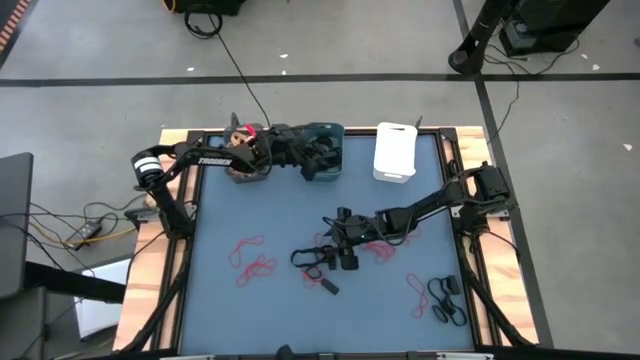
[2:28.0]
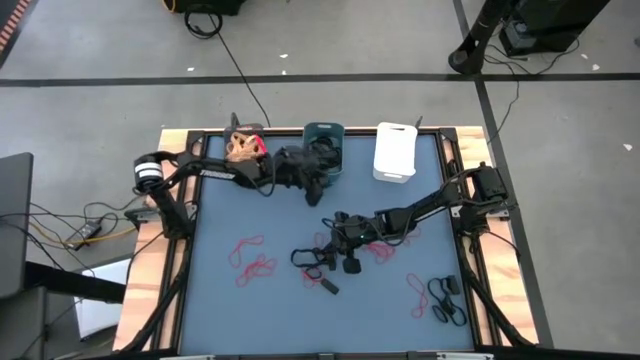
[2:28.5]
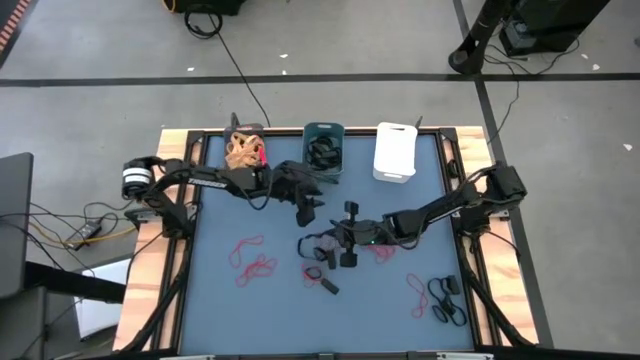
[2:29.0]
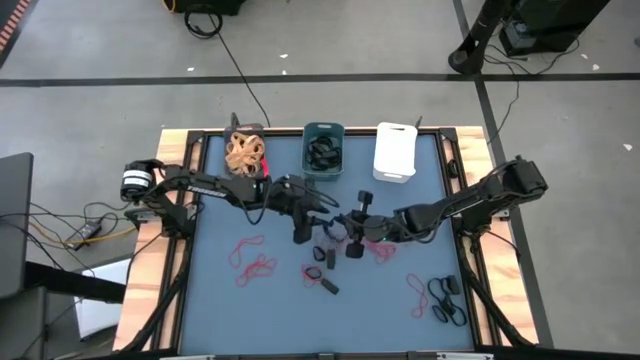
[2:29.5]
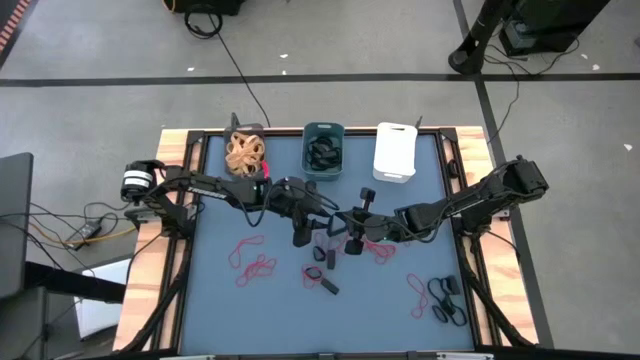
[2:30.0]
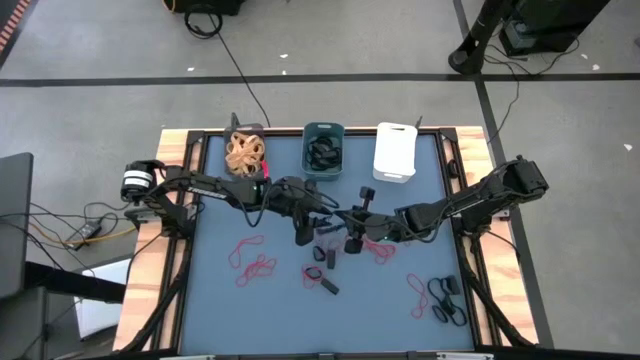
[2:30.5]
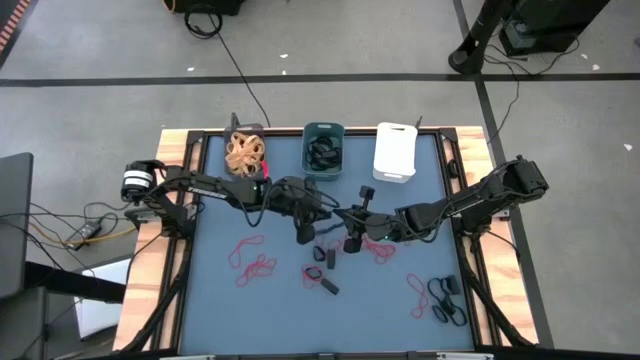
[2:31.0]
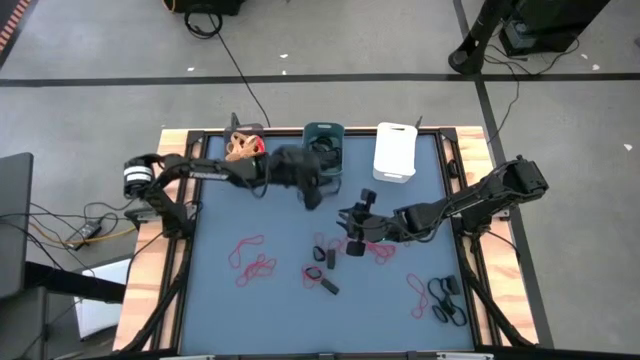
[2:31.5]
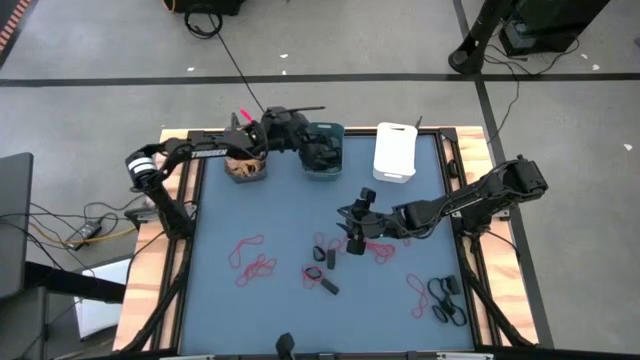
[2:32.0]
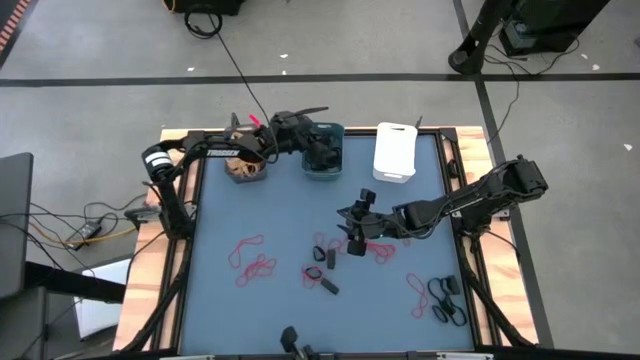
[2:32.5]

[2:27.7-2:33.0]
Task: Sort rubber bands into baskets
Put the black rubber band into the blue bin

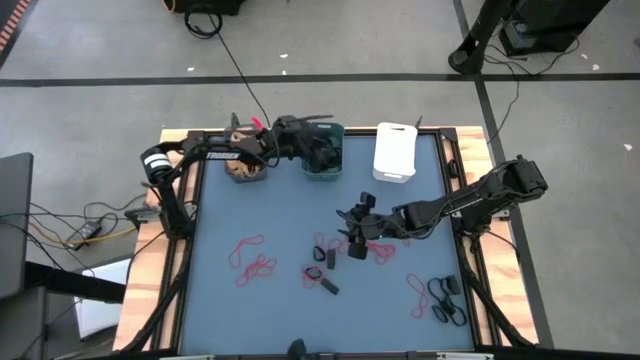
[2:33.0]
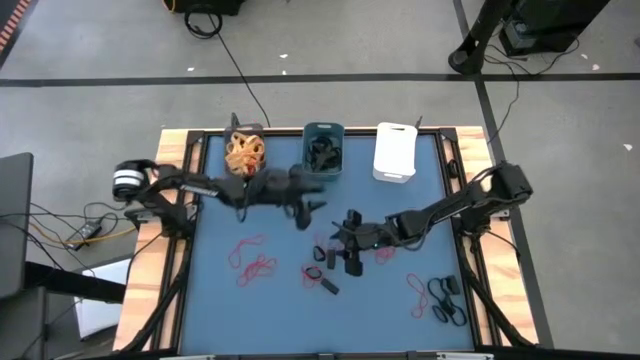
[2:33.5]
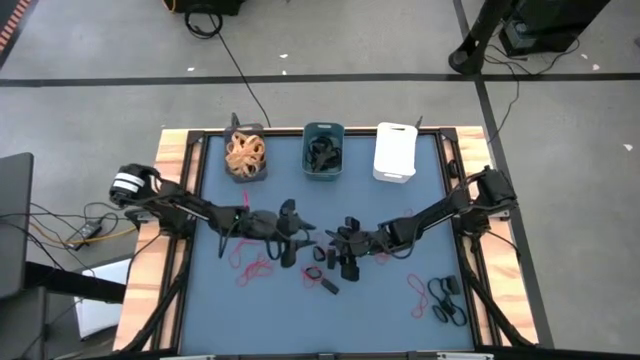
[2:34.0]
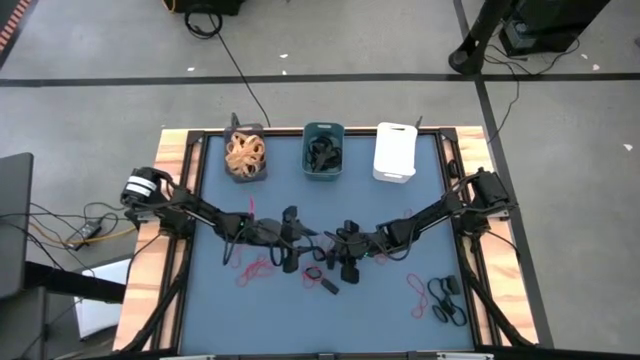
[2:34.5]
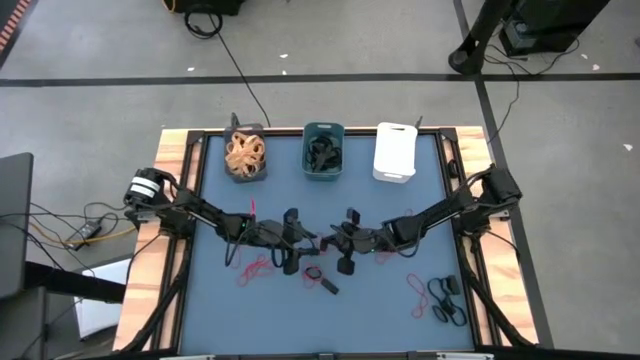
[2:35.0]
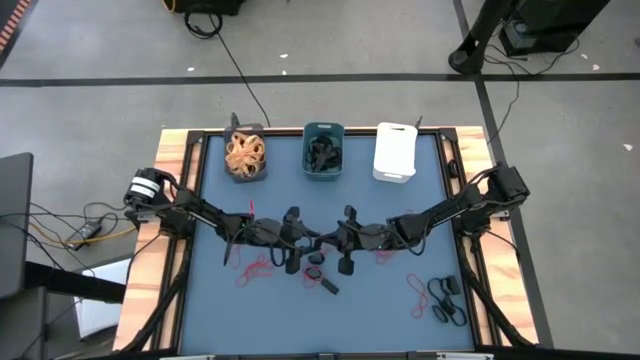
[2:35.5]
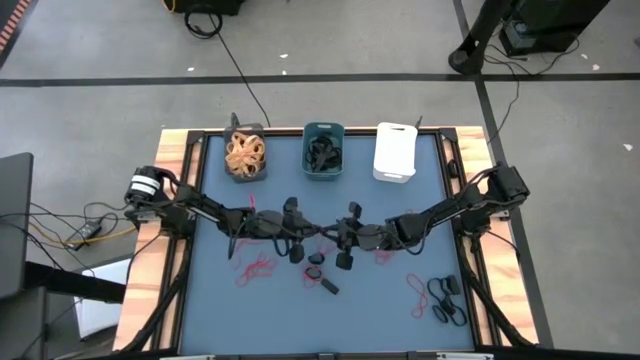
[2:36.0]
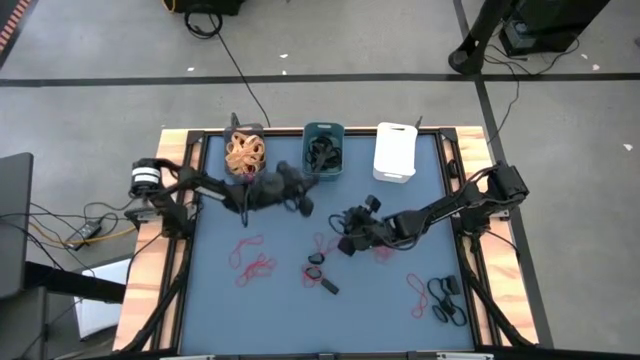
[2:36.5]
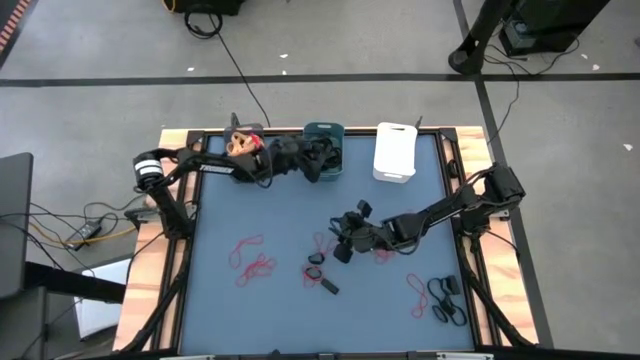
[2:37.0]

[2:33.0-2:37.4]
Put the black rubber band into the blue bin

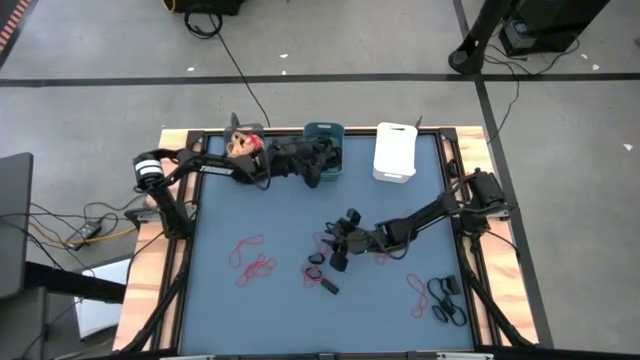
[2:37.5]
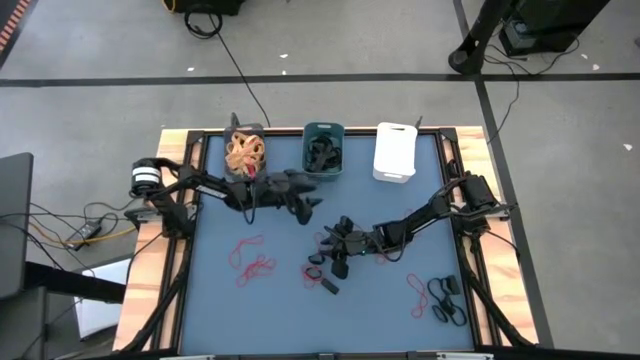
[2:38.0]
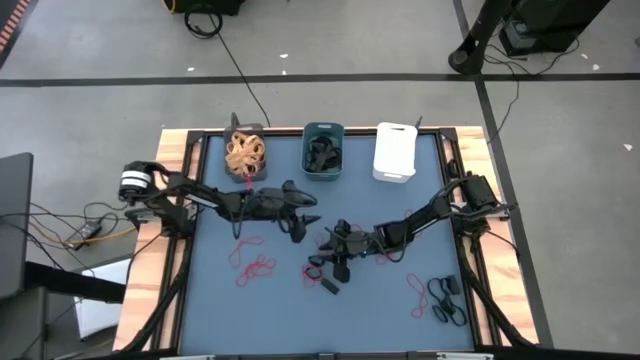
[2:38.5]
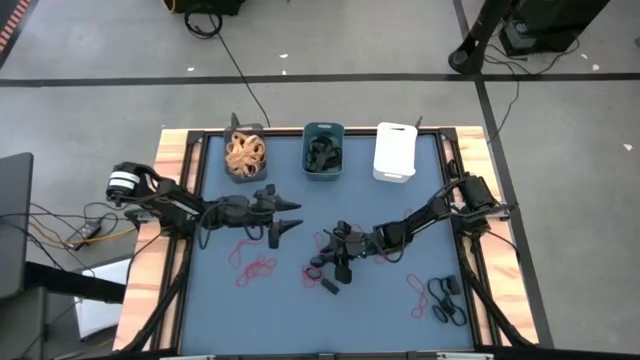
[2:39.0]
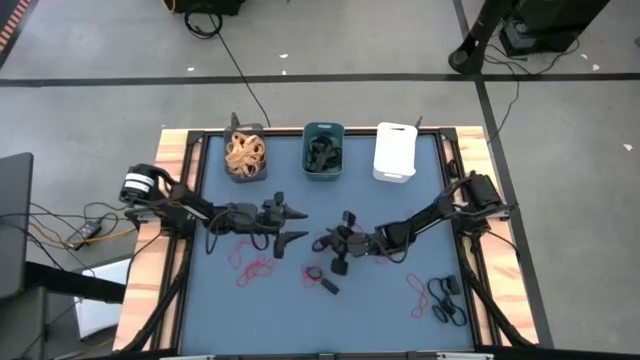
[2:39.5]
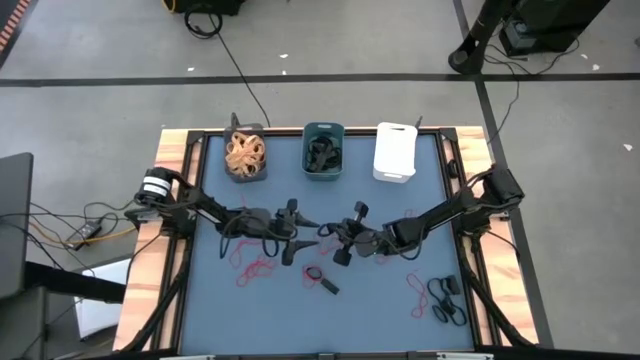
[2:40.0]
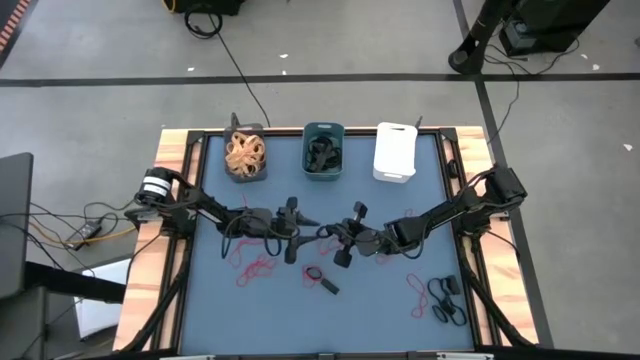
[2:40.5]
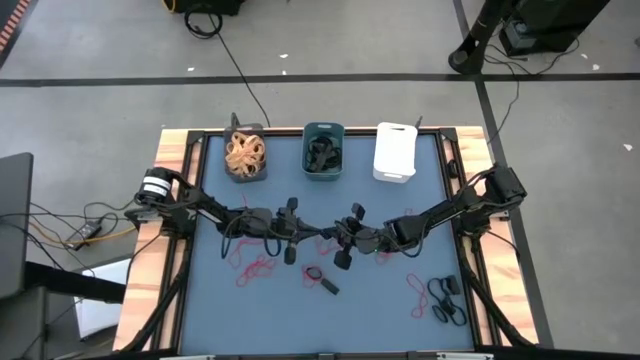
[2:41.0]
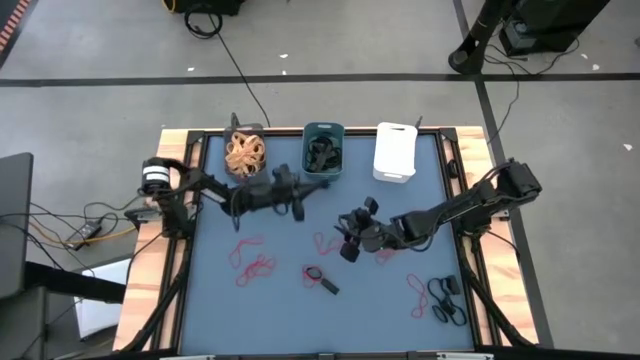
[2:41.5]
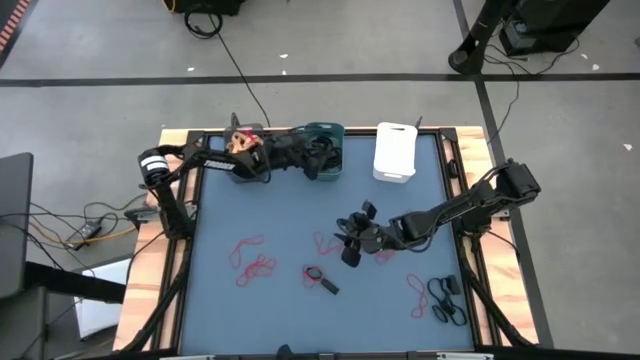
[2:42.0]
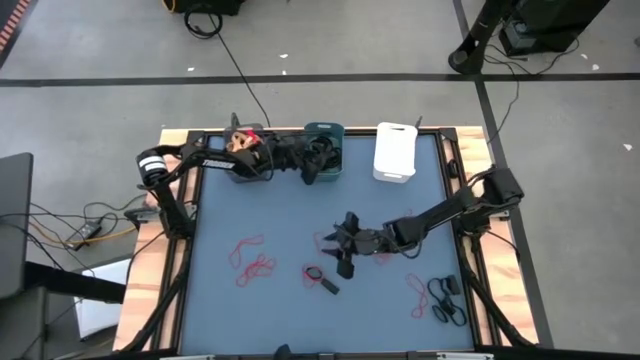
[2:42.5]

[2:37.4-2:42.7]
Put the black rubber band into the blue bin

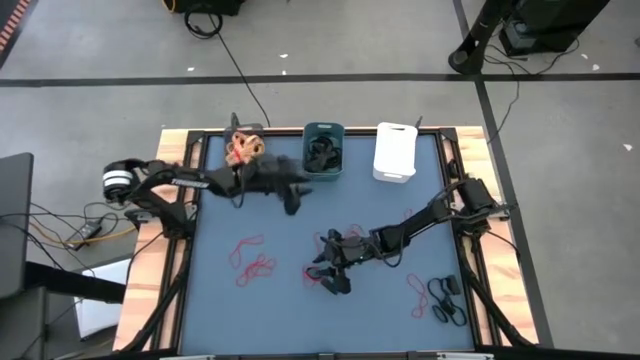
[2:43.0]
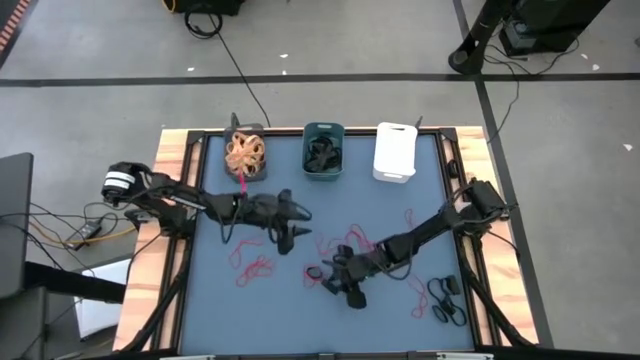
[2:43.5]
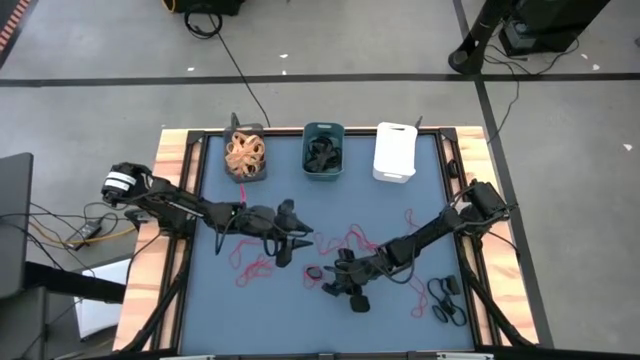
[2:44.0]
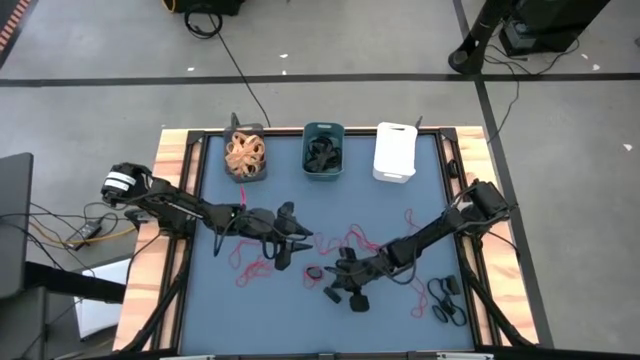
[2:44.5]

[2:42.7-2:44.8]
Put the black rubber band into the blue bin

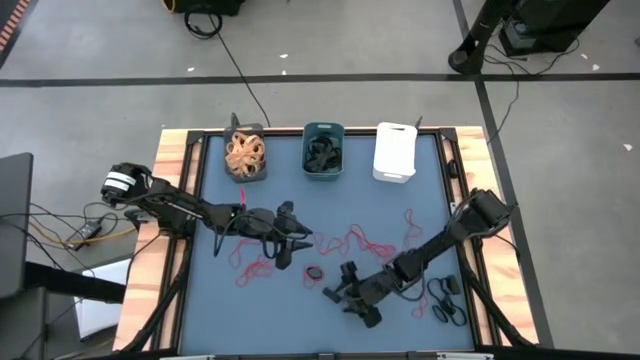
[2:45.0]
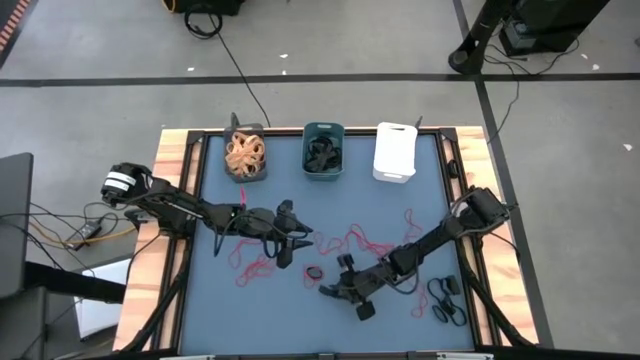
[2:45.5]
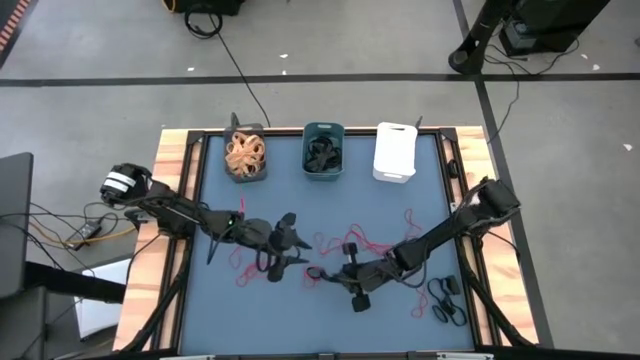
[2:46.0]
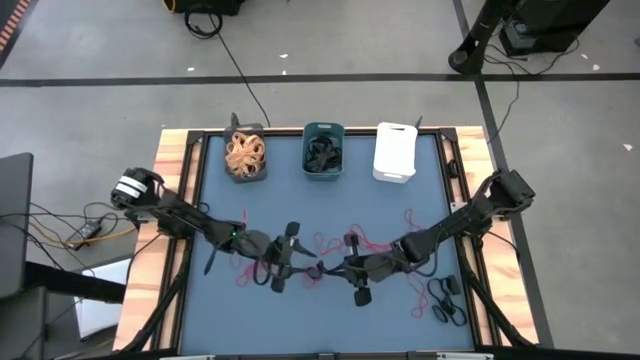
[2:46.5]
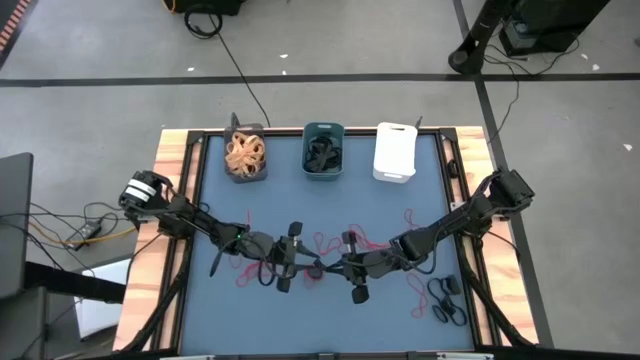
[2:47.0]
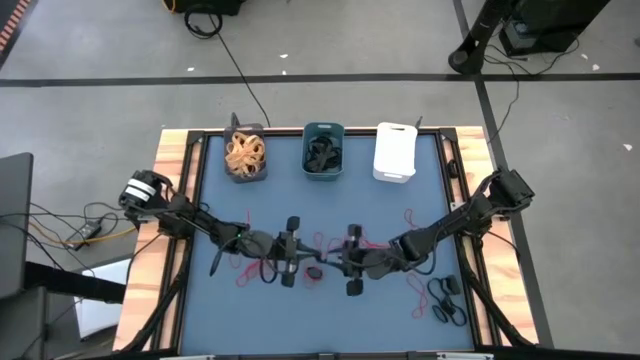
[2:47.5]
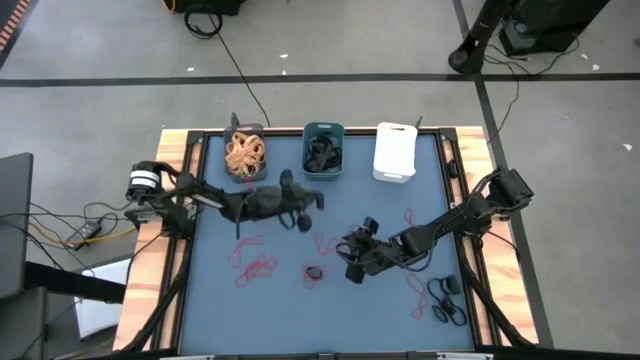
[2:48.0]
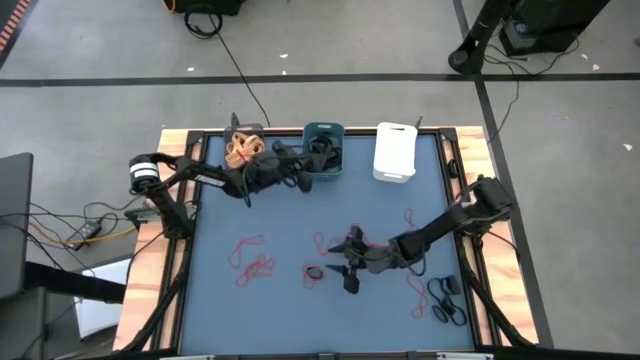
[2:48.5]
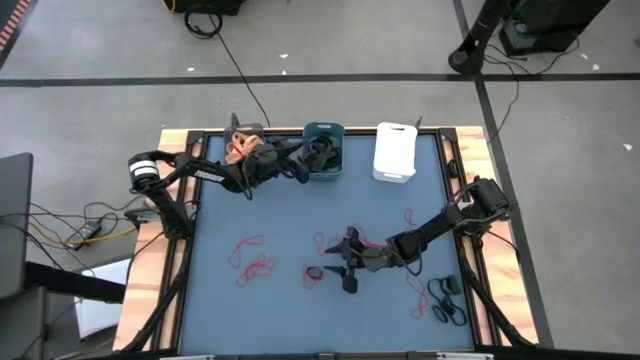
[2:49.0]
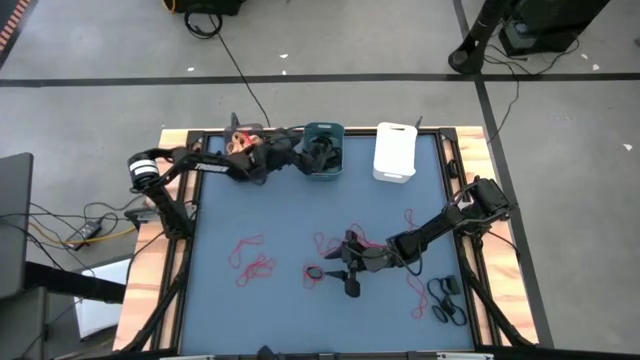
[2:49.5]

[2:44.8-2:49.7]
Put the black rubber band into the blue bin

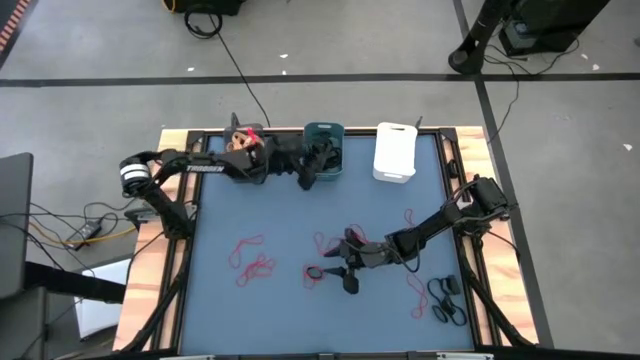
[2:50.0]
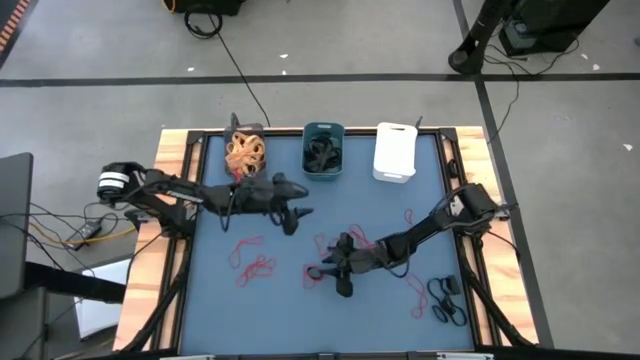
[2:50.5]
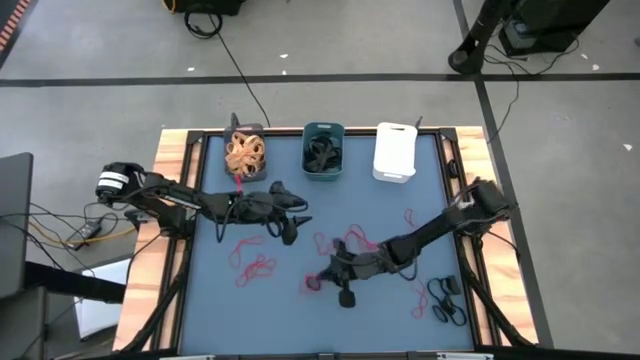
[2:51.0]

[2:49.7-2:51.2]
Put the black rubber band into the blue bin
